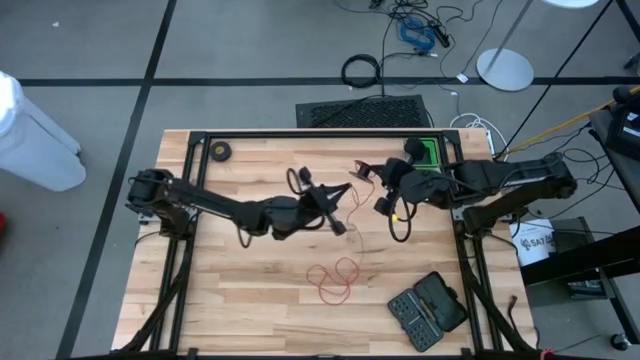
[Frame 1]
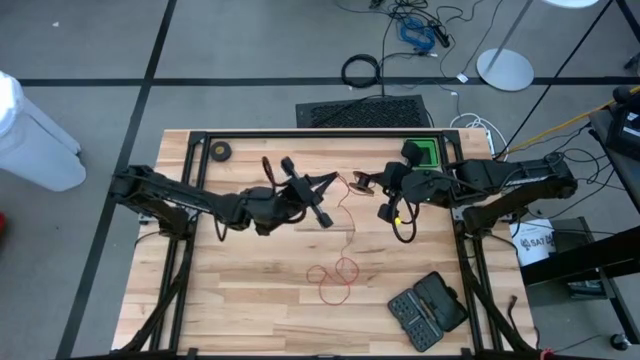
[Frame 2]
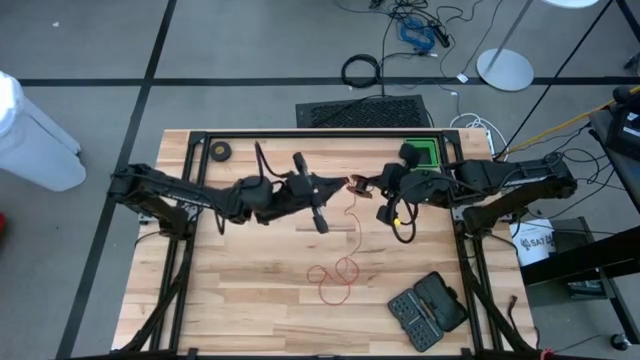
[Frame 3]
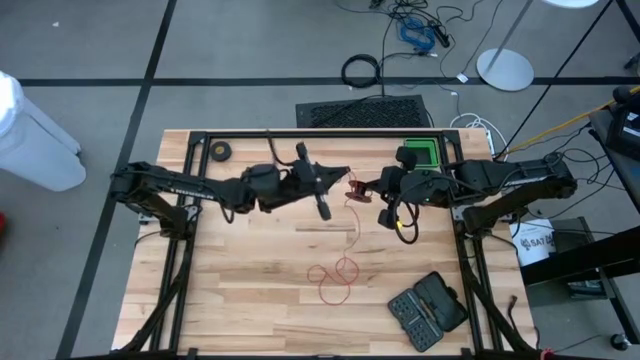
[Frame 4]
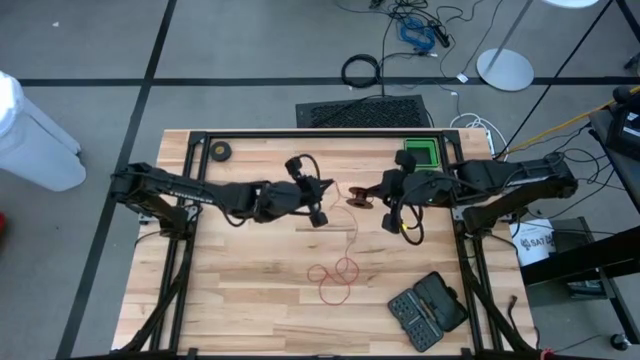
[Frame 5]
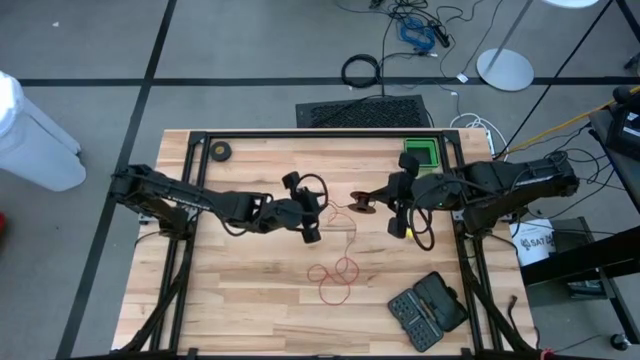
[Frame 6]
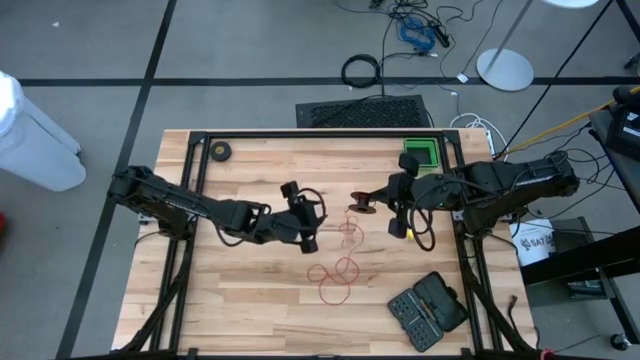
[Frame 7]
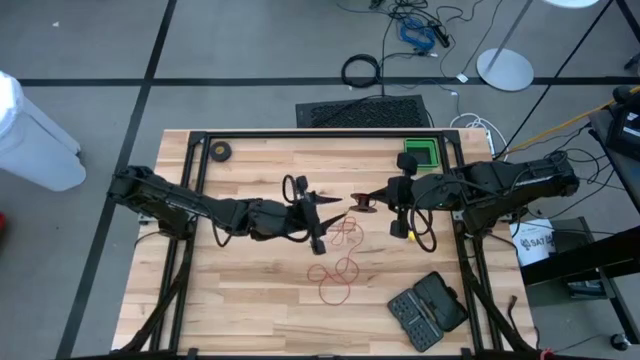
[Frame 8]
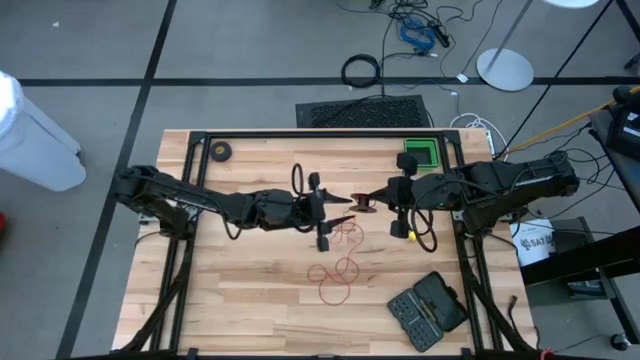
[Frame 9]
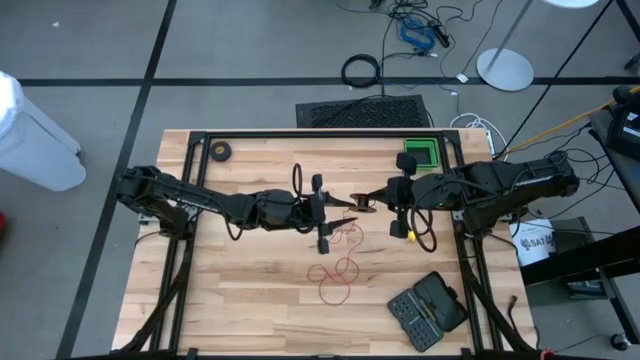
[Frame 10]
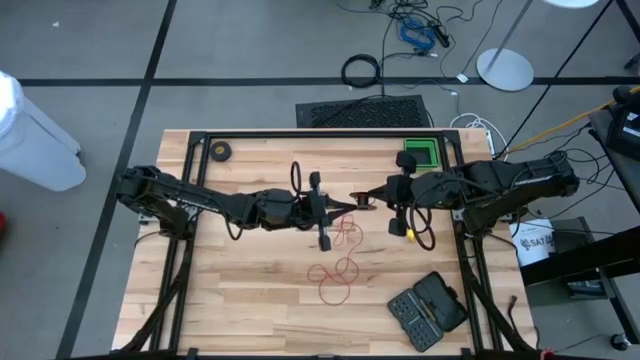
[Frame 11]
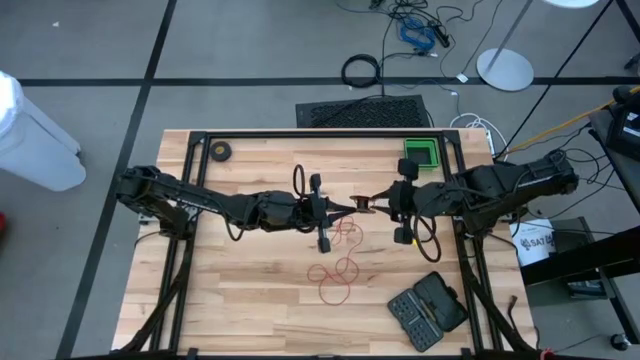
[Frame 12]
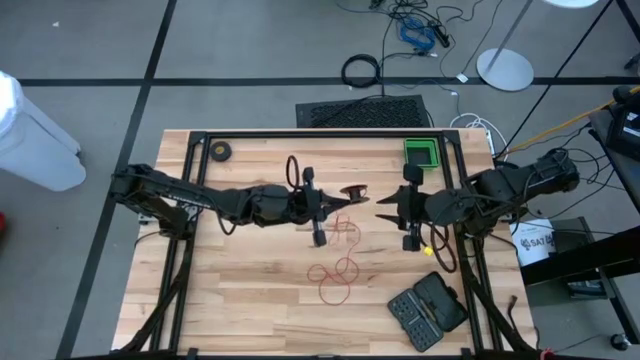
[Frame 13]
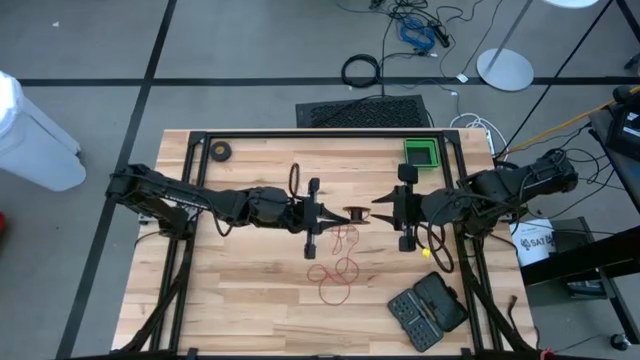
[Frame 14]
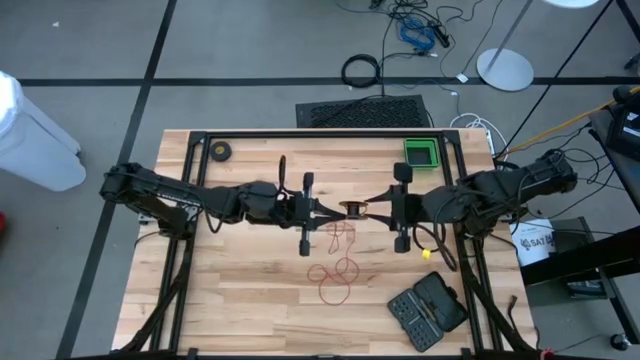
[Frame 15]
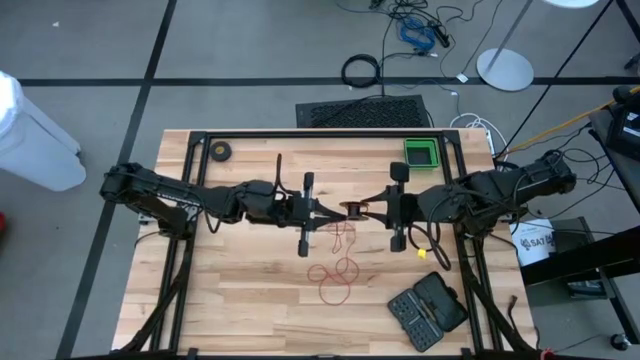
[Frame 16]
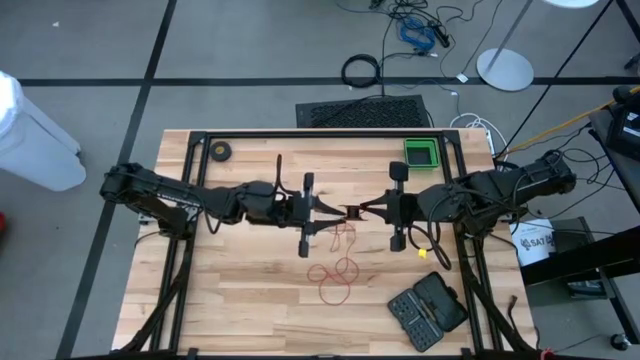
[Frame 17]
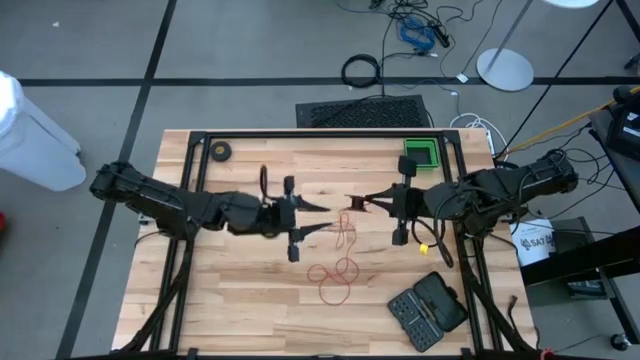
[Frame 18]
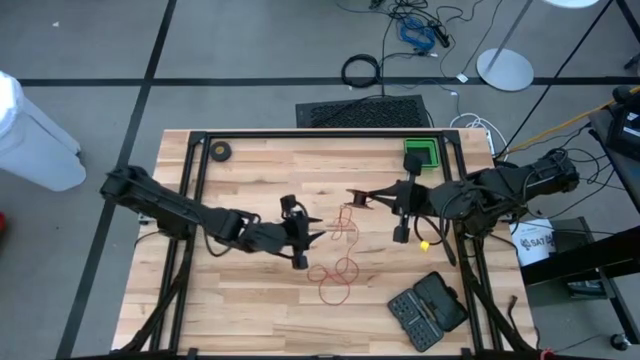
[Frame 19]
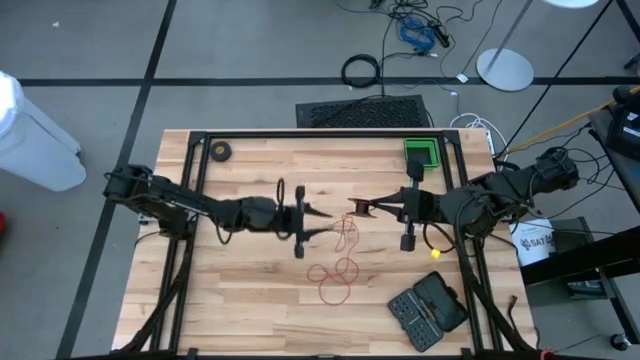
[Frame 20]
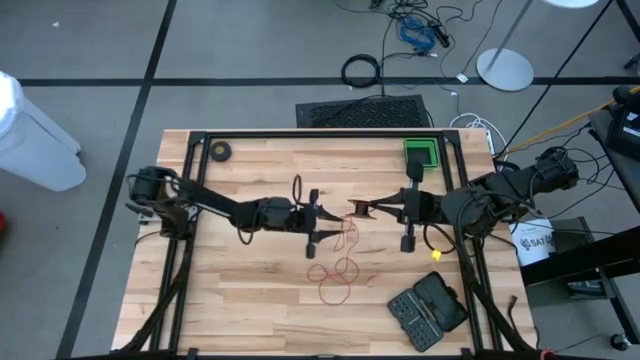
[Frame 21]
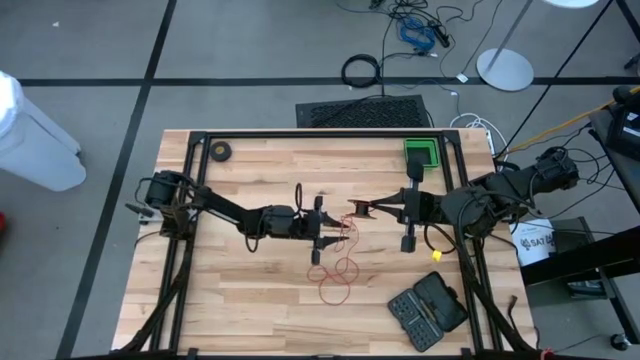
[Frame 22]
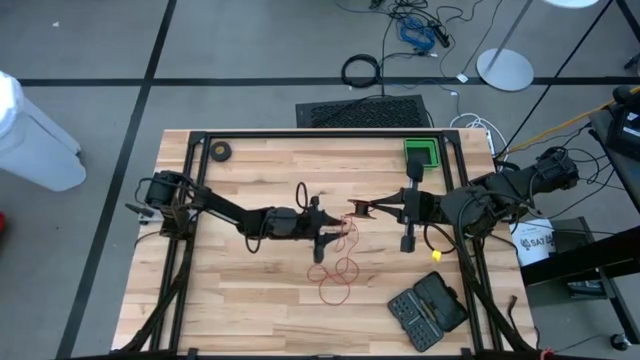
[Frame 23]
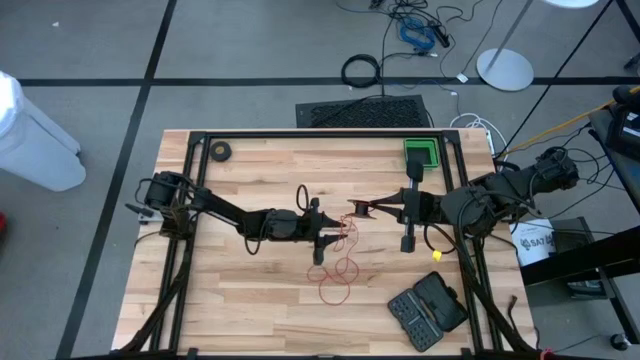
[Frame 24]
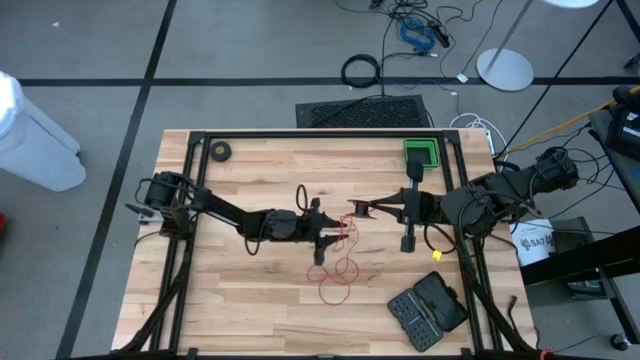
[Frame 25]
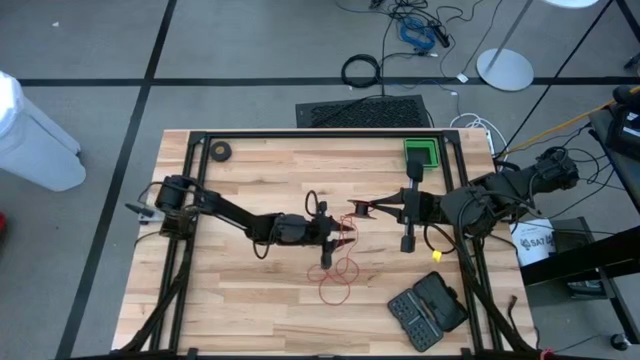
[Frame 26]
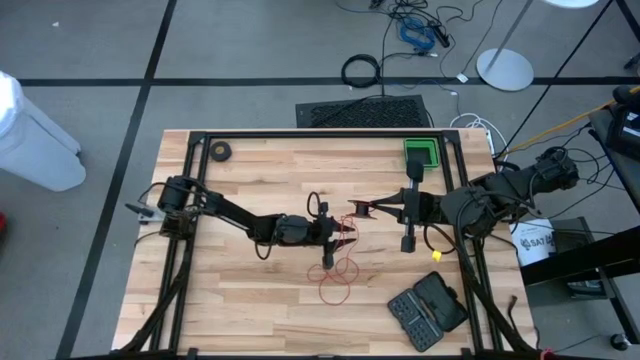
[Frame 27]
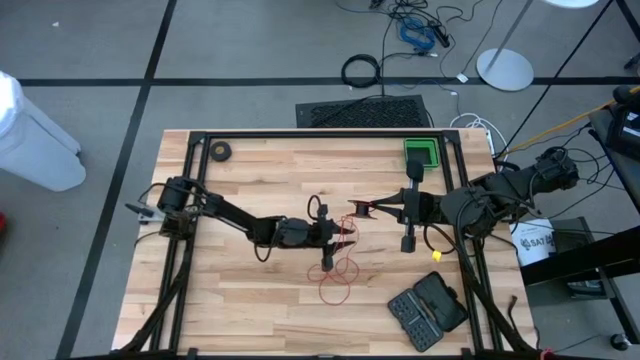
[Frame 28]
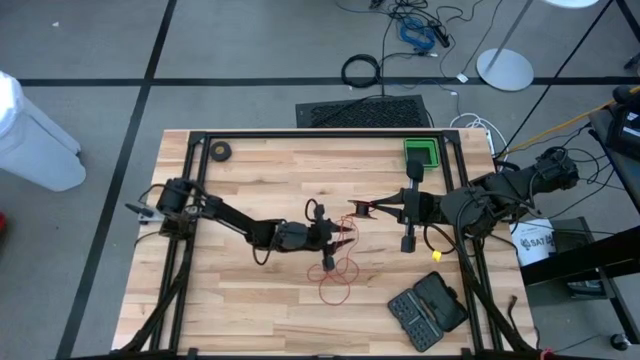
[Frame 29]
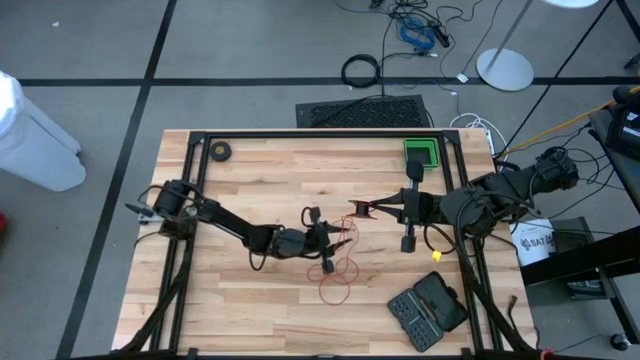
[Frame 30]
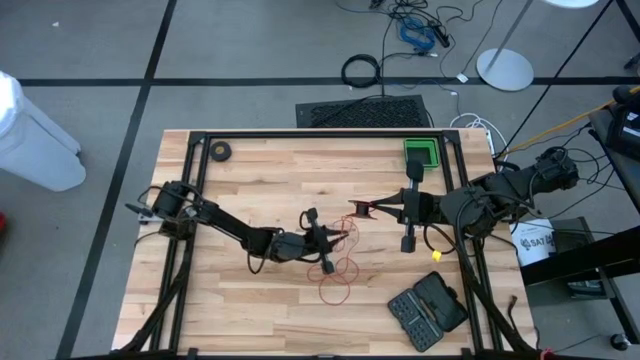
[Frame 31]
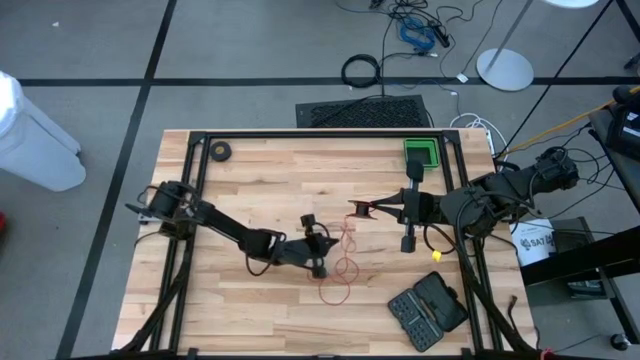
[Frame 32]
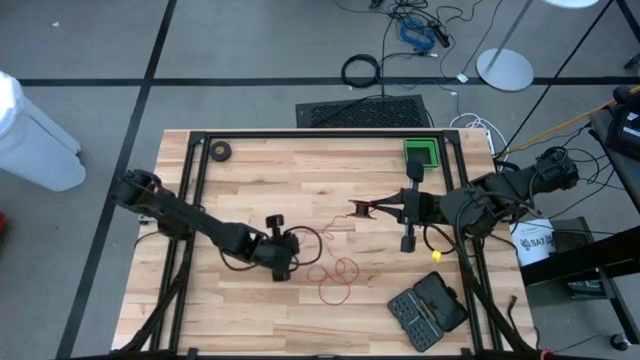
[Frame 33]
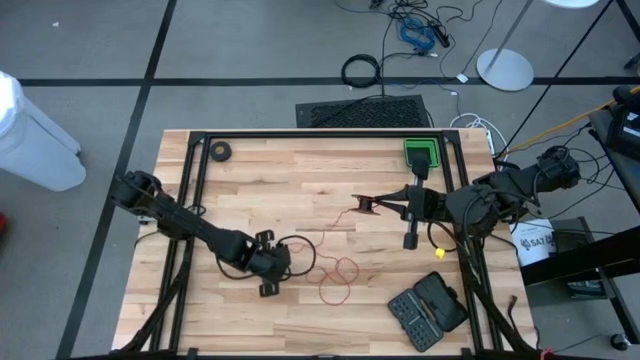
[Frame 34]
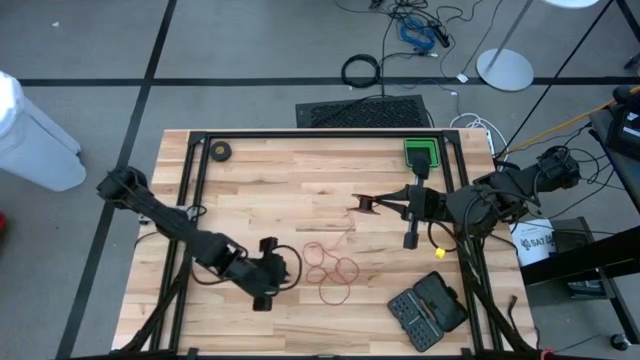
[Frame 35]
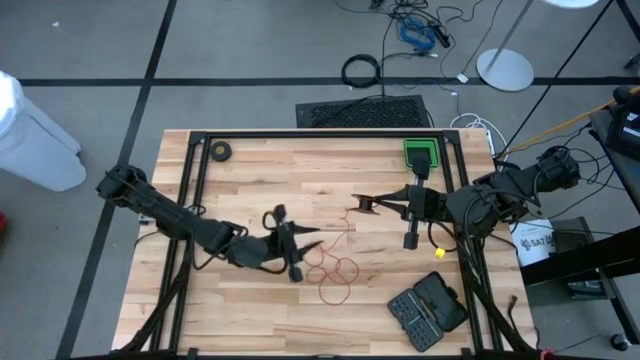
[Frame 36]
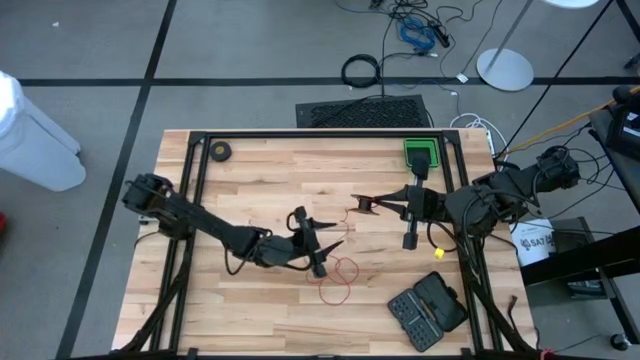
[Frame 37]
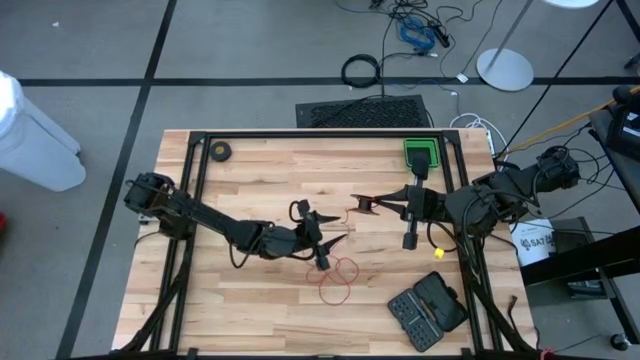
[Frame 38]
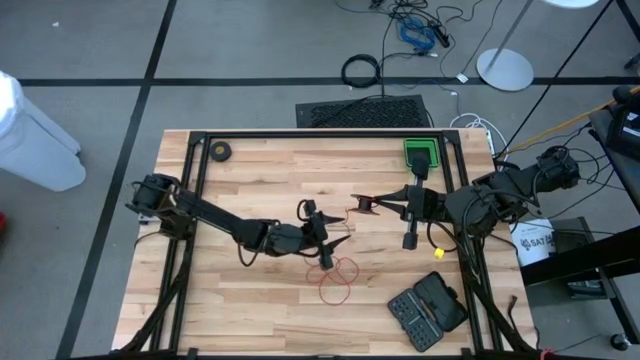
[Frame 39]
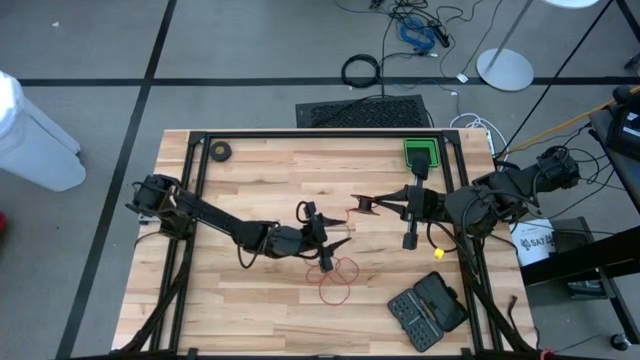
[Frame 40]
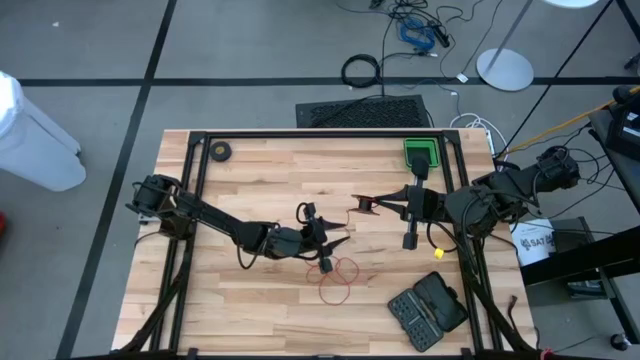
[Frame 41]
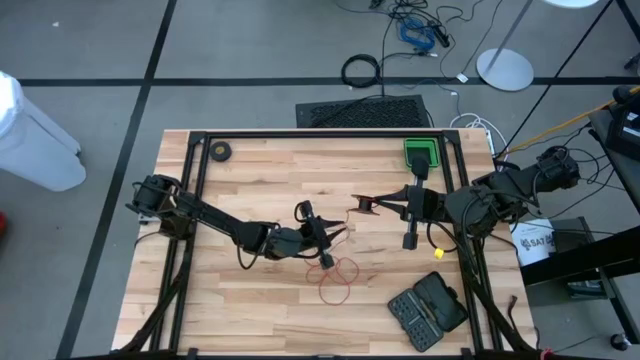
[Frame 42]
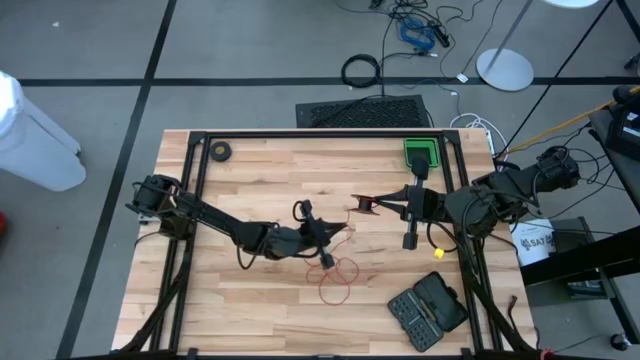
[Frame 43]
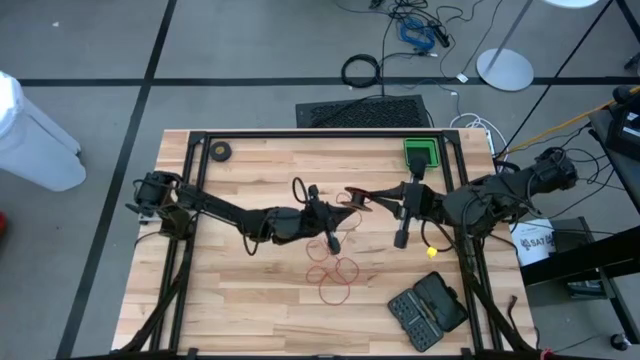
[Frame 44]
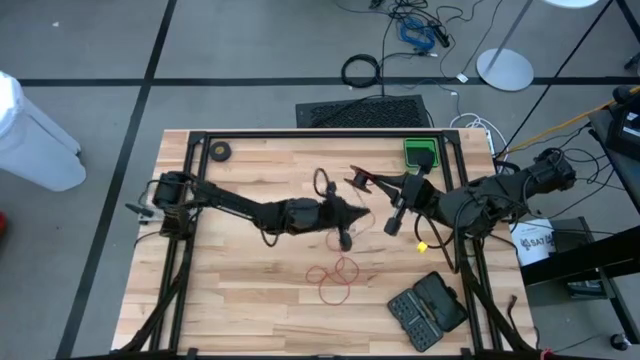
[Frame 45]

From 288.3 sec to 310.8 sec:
Task: Coil cords
Coil the red wire into the spool
